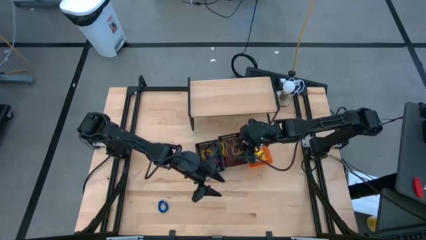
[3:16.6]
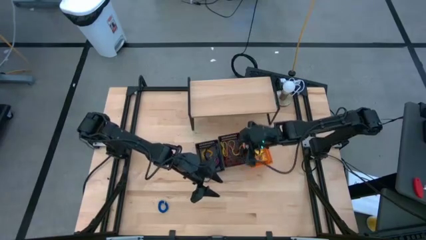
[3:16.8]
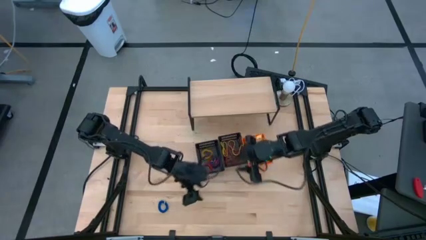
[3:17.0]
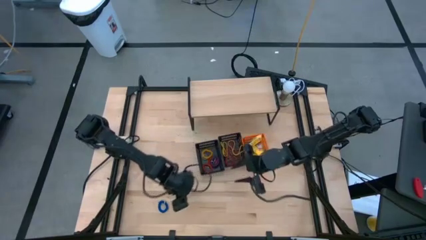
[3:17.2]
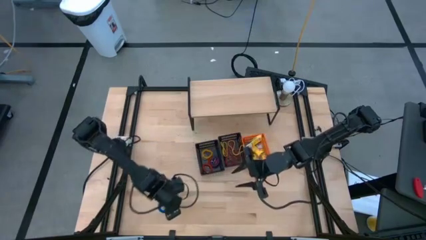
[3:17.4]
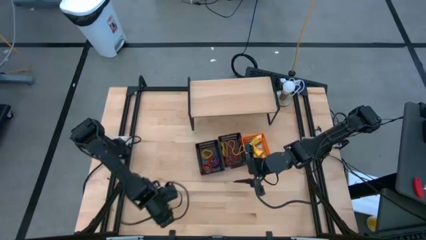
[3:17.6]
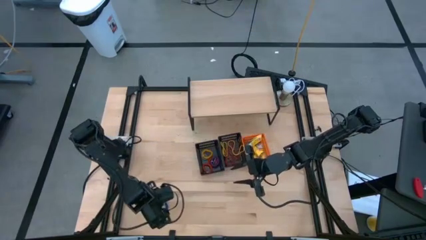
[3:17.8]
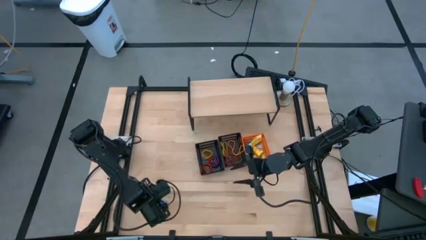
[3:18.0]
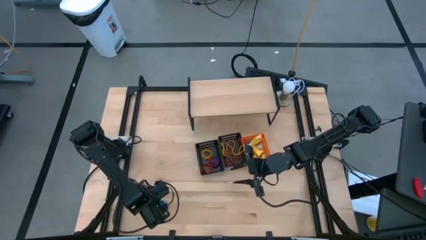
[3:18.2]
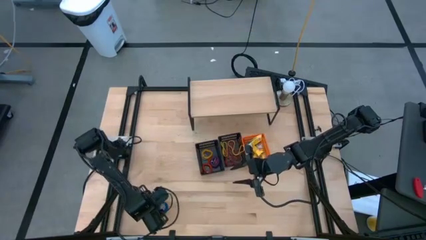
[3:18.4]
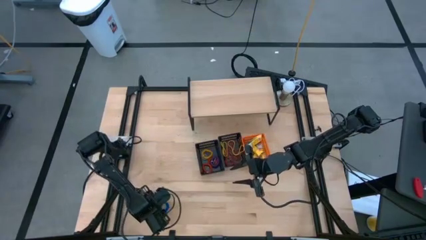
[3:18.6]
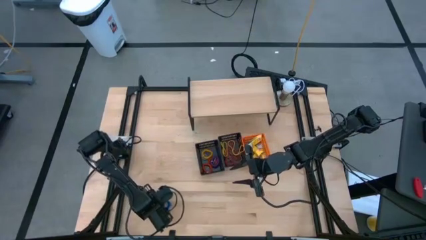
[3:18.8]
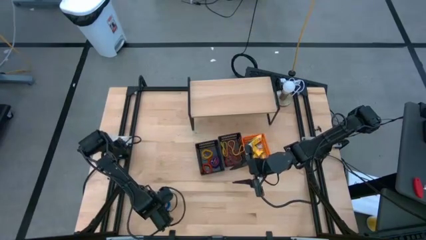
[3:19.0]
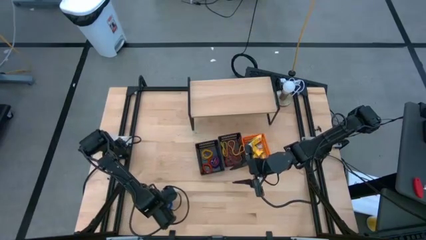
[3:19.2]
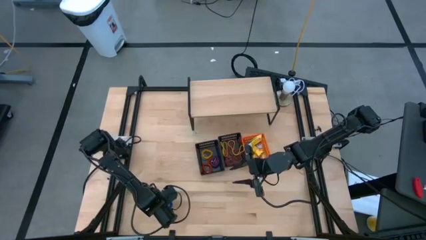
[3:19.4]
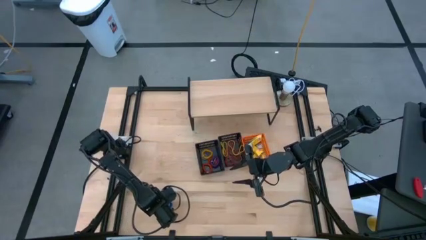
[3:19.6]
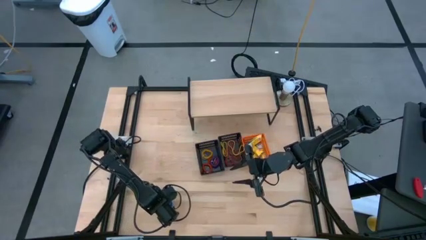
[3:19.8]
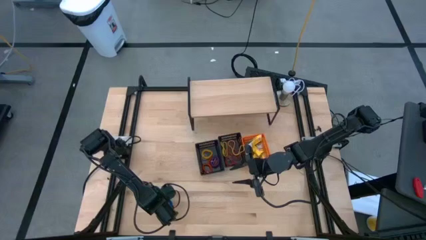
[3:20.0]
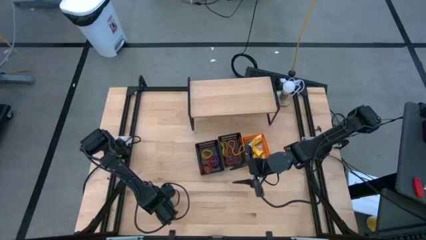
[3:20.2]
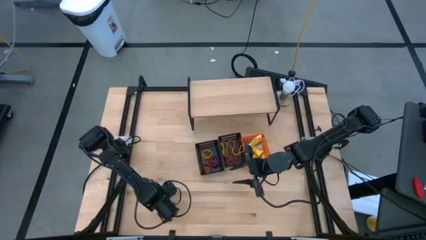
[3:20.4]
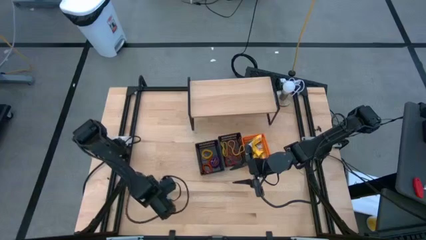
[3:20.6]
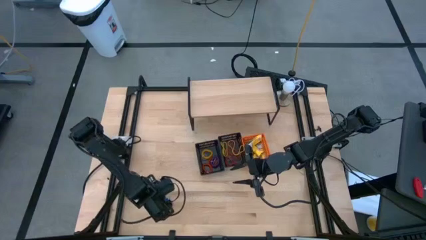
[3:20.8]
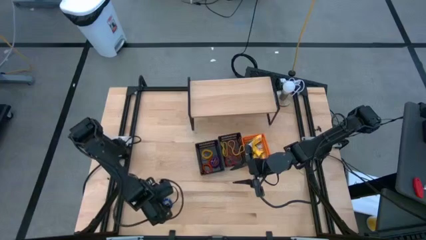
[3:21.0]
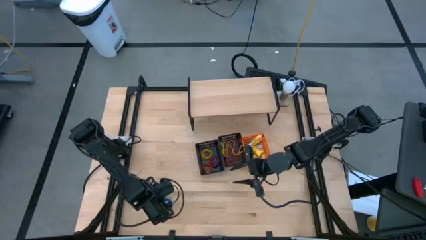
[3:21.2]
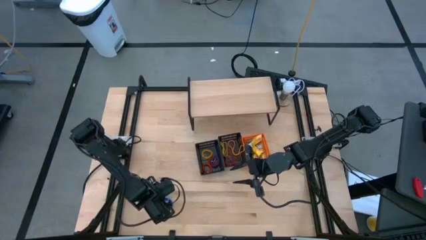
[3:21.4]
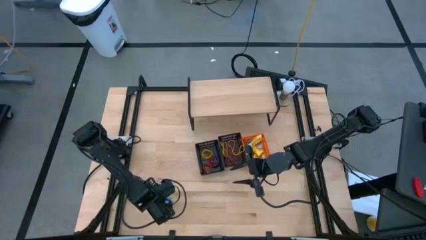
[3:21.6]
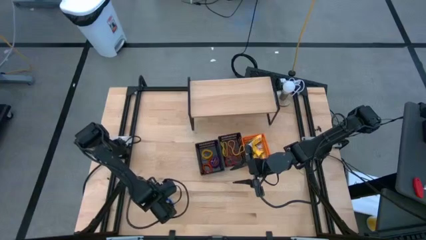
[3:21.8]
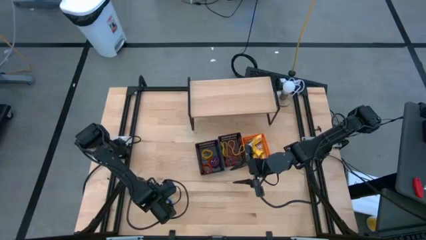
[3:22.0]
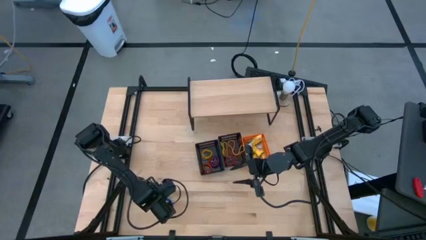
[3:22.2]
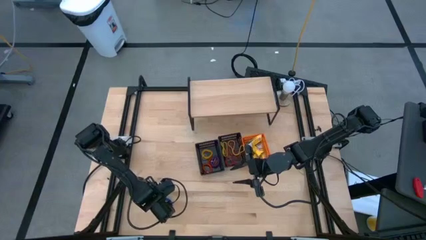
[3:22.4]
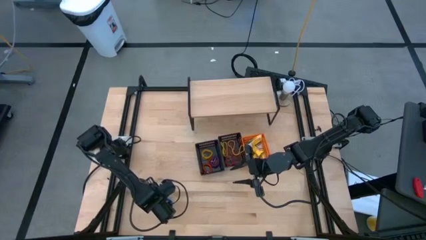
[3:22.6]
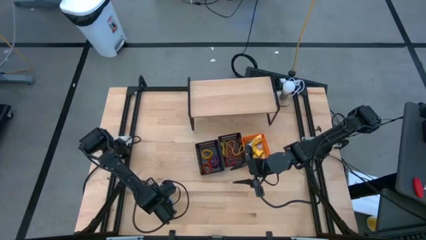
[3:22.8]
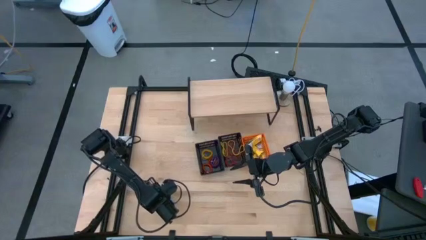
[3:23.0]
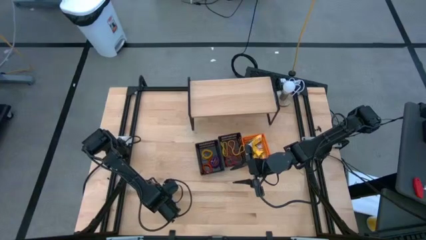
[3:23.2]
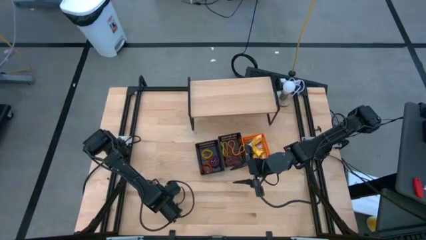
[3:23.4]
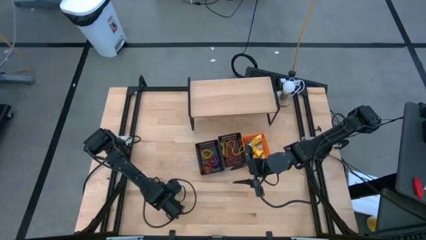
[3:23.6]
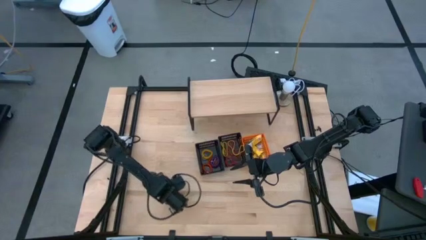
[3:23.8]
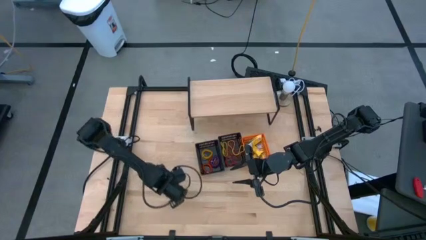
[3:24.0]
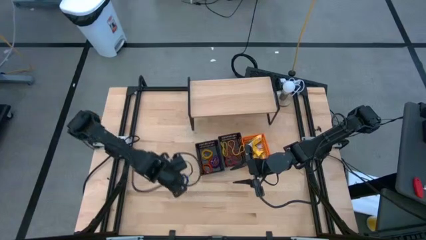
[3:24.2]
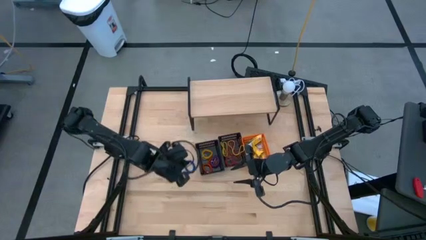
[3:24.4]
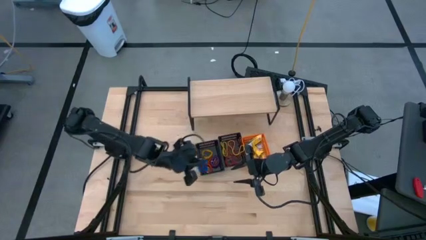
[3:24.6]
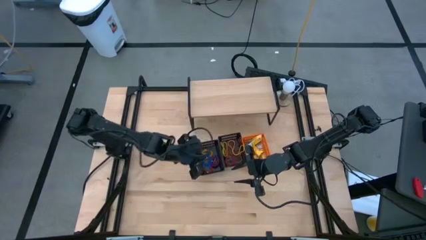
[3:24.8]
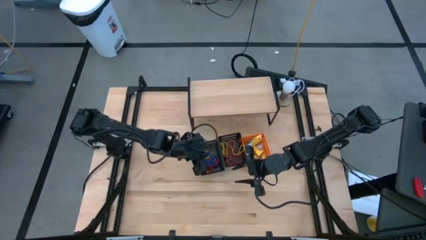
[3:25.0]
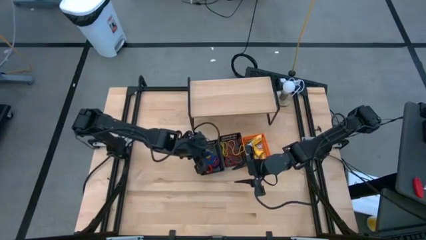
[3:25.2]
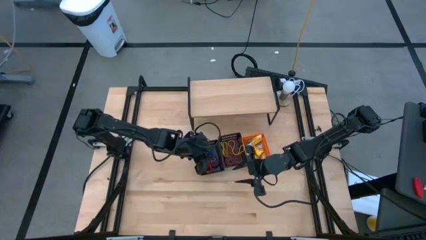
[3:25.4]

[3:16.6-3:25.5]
Task: Pick & Place Office Desk Supplies
Put the blue spiral keychain into the left black bin

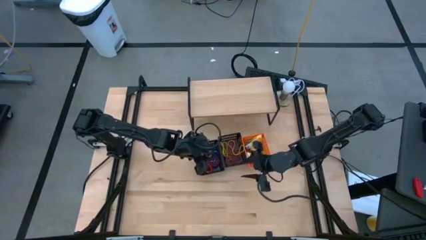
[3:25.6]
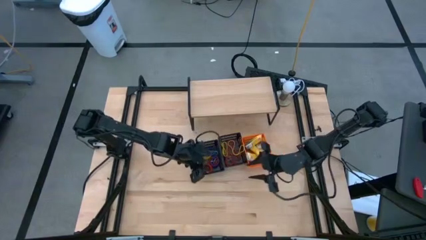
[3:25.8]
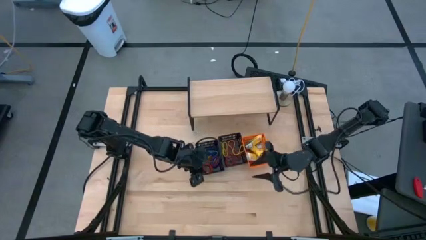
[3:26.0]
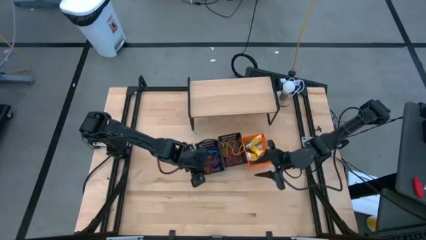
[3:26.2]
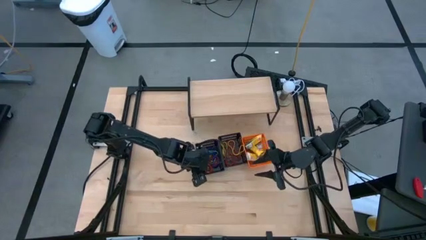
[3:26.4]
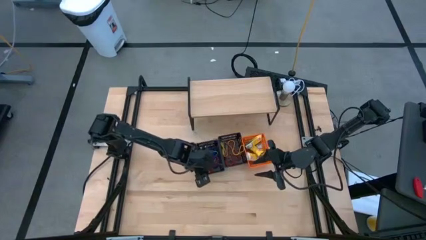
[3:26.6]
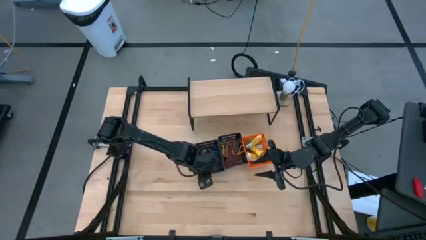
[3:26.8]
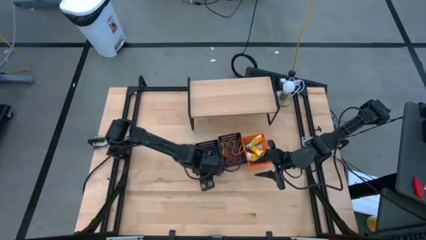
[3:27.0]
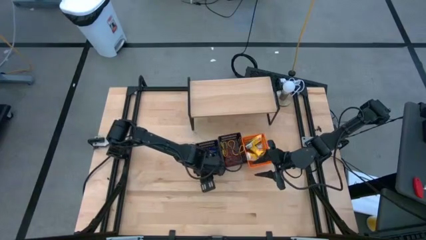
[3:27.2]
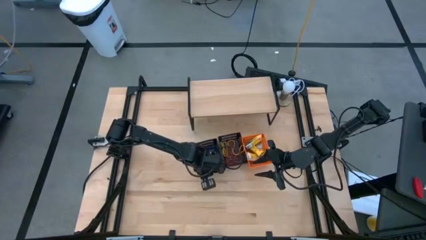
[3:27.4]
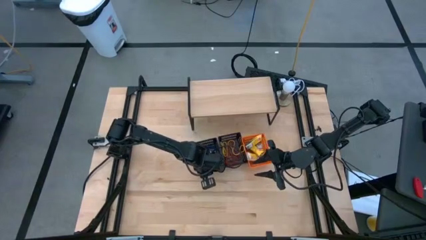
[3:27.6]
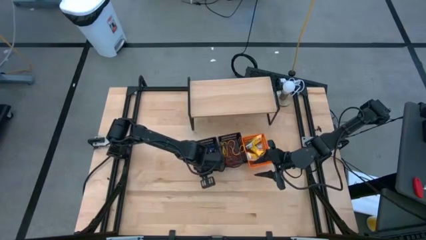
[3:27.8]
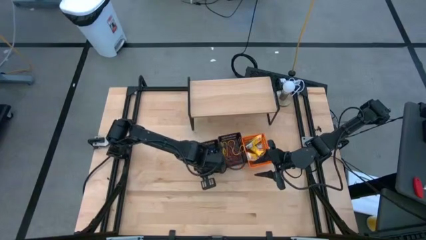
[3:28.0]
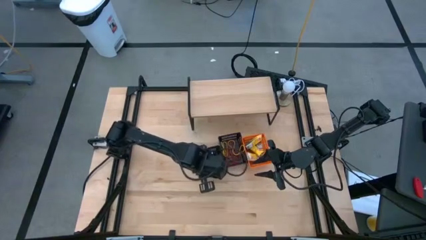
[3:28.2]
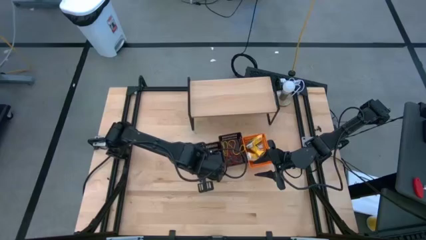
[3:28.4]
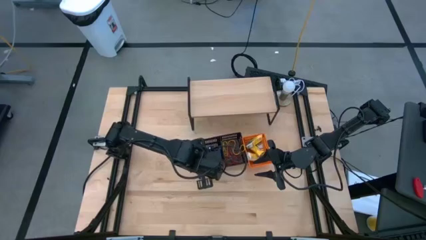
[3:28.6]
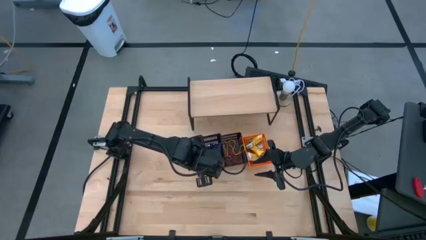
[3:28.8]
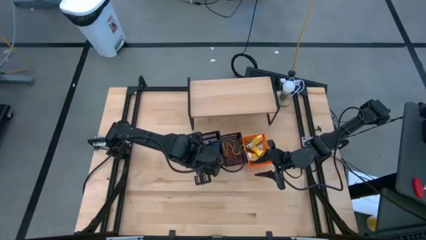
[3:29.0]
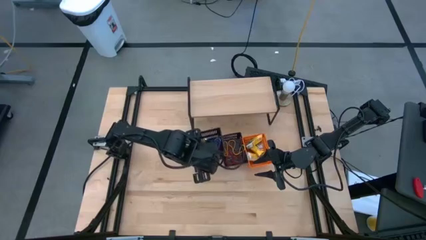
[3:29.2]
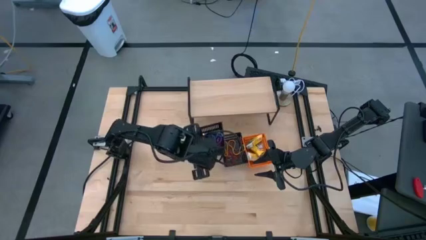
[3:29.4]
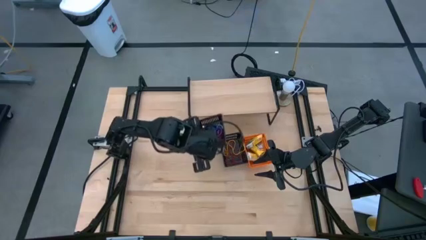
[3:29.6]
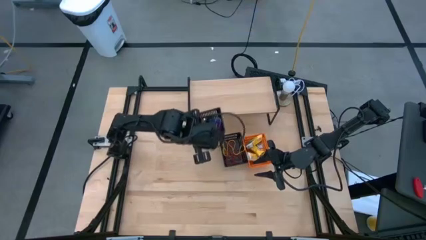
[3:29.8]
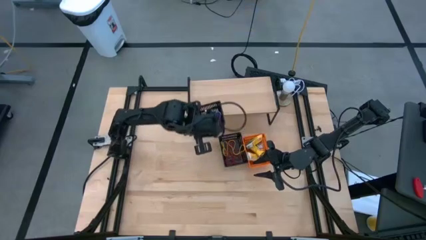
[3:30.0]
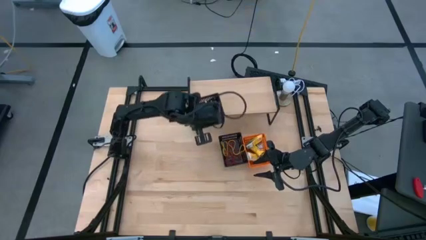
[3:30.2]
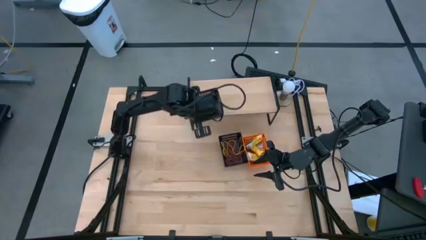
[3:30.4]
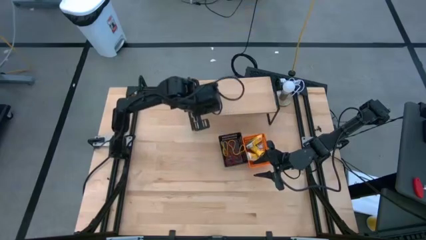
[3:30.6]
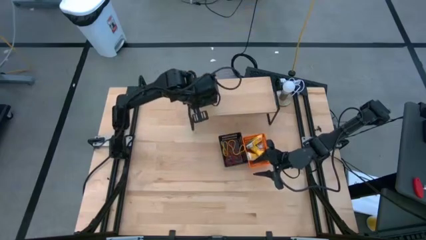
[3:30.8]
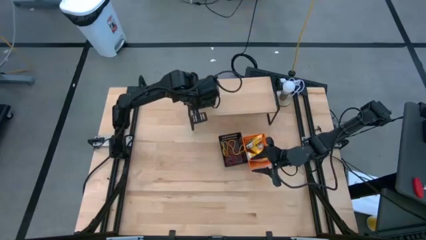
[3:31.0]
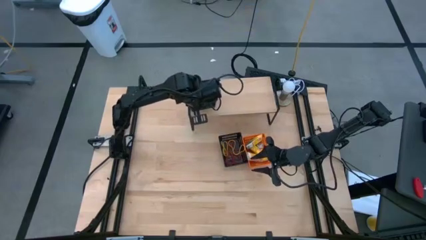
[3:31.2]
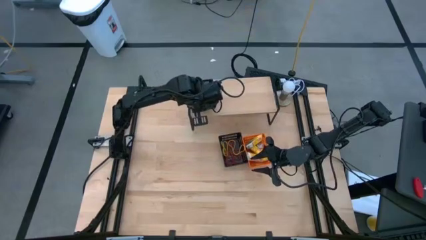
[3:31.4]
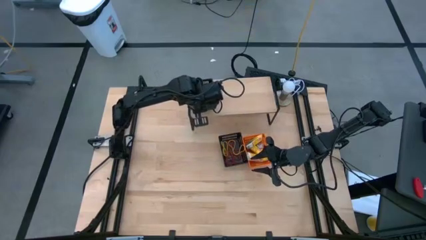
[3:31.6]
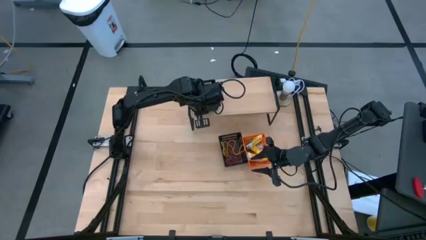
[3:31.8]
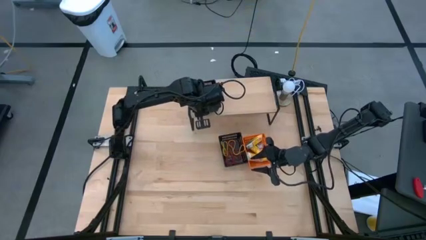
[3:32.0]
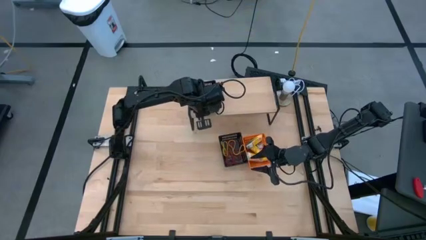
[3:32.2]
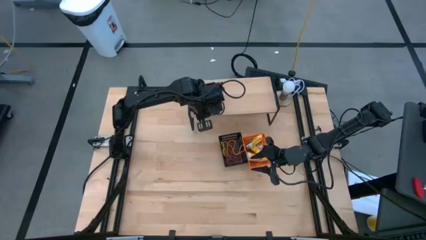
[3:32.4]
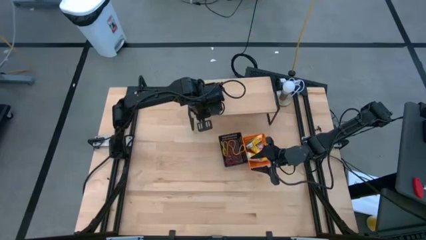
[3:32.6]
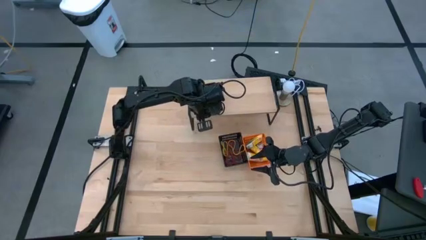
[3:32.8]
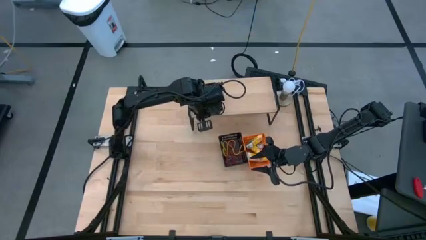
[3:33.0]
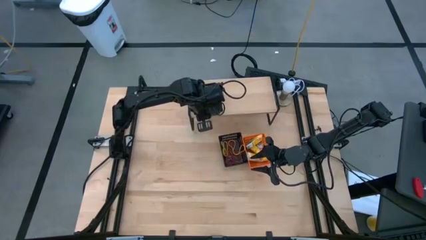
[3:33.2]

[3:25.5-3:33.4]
Put the left black bin with spiral keychain on the shelf
